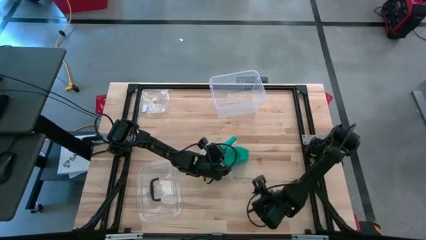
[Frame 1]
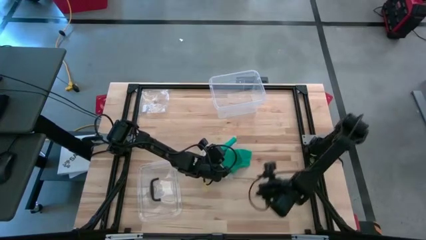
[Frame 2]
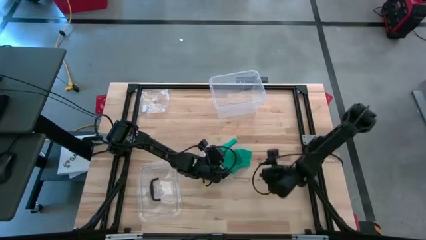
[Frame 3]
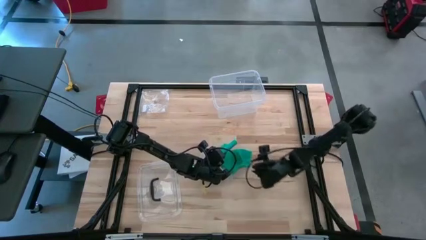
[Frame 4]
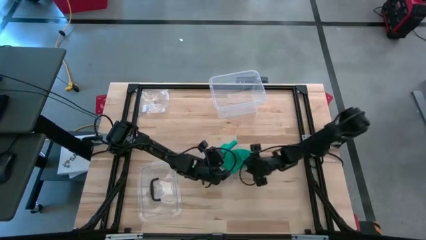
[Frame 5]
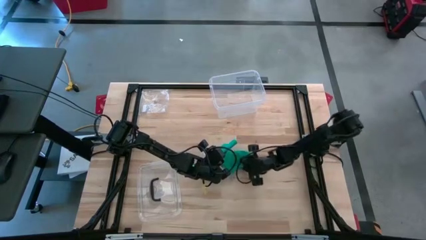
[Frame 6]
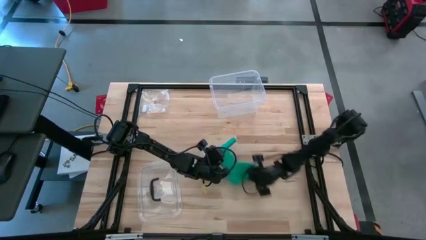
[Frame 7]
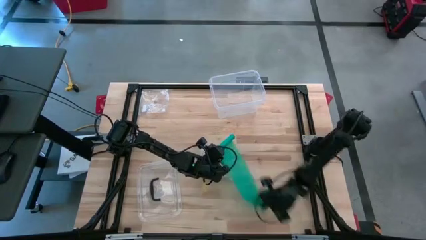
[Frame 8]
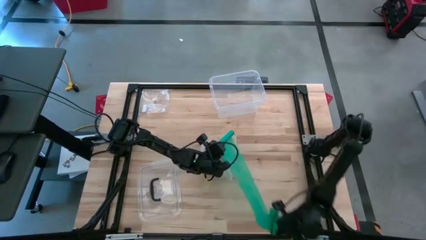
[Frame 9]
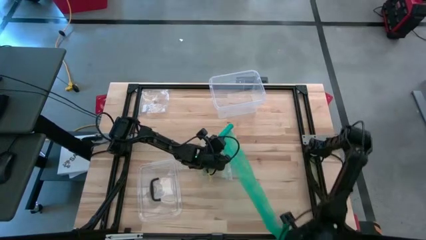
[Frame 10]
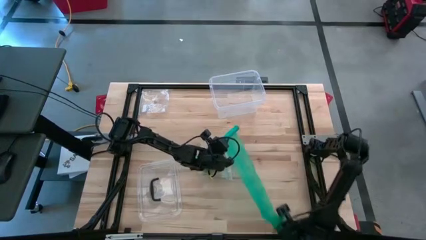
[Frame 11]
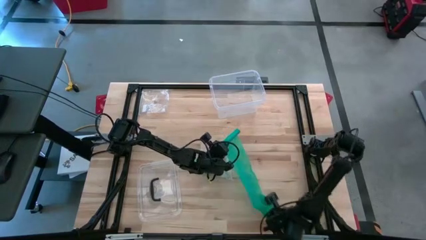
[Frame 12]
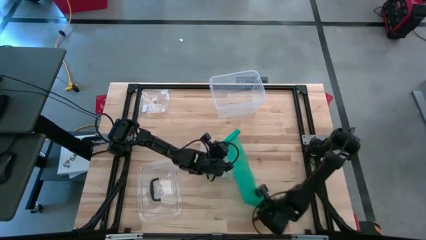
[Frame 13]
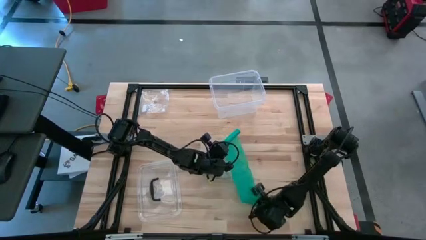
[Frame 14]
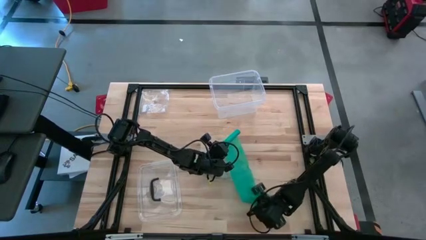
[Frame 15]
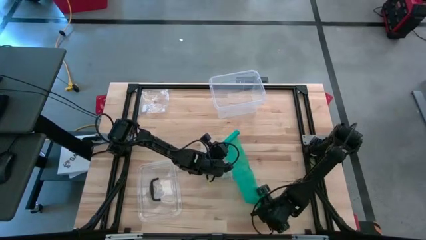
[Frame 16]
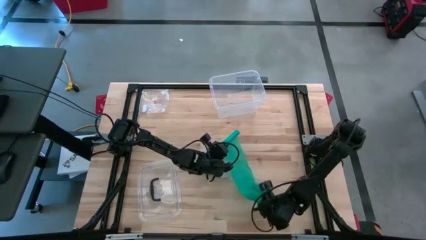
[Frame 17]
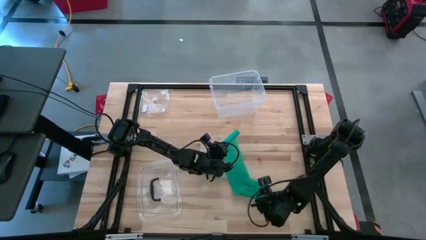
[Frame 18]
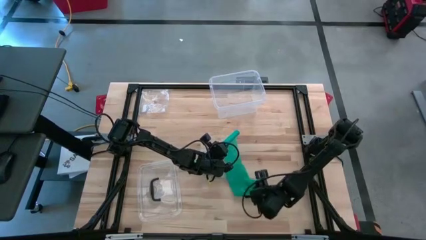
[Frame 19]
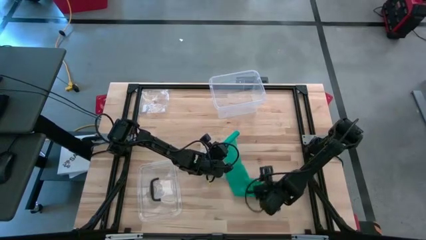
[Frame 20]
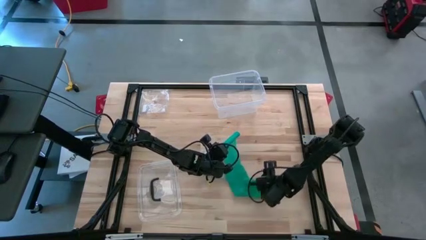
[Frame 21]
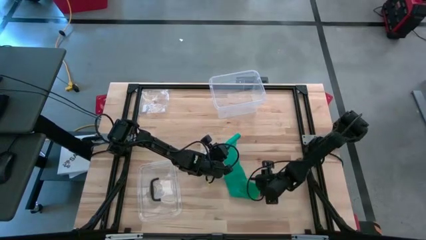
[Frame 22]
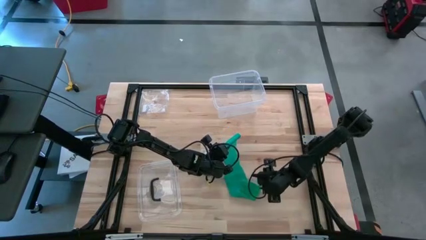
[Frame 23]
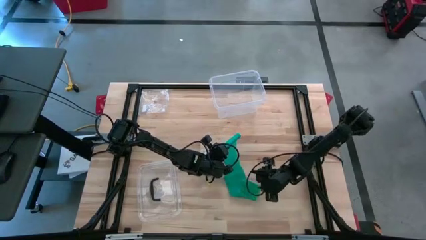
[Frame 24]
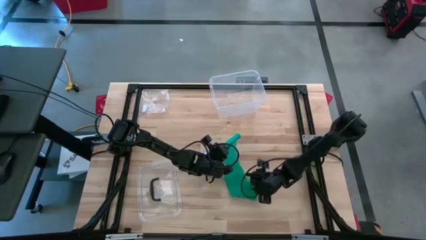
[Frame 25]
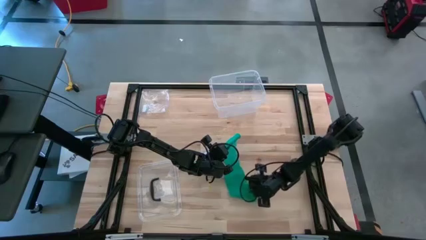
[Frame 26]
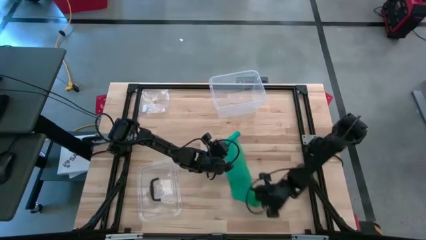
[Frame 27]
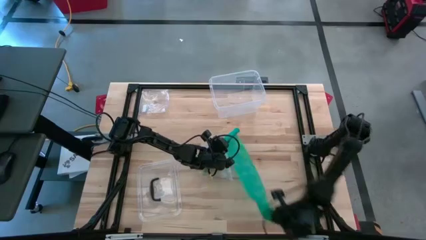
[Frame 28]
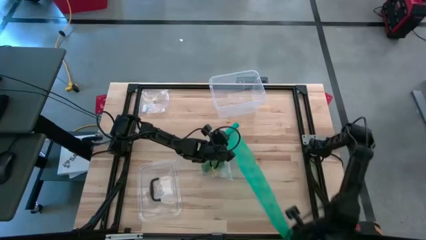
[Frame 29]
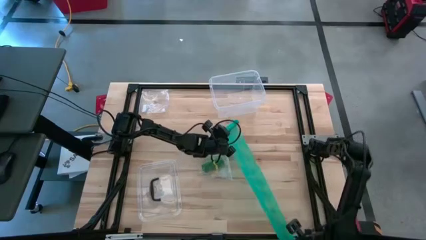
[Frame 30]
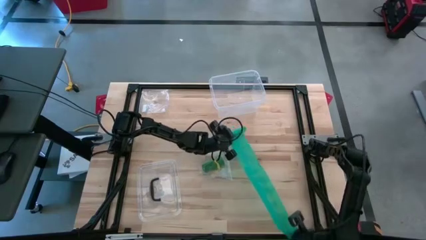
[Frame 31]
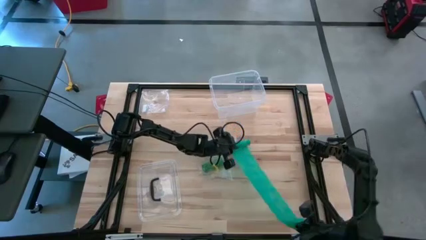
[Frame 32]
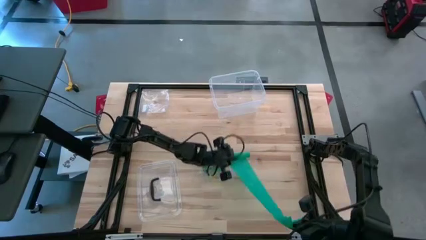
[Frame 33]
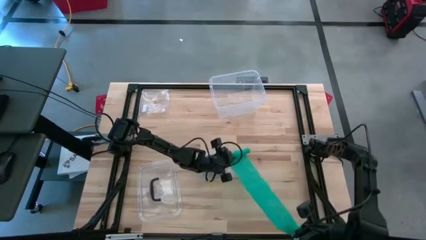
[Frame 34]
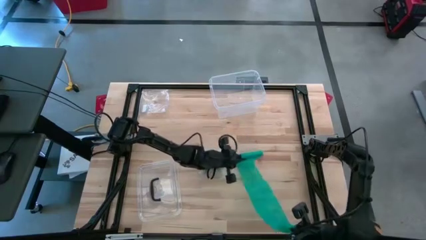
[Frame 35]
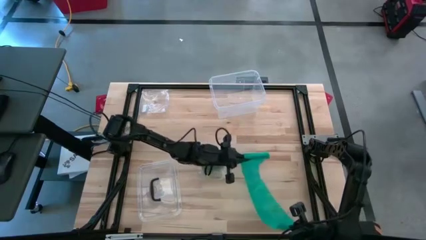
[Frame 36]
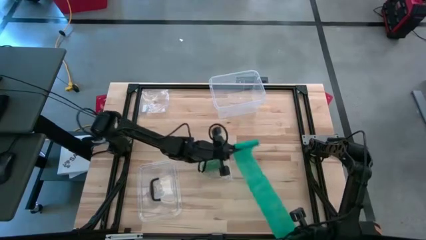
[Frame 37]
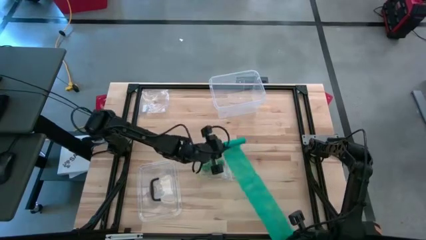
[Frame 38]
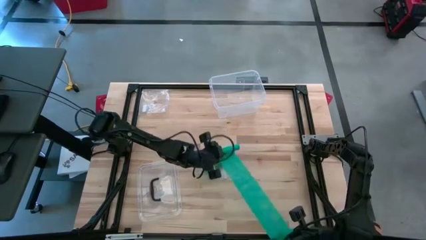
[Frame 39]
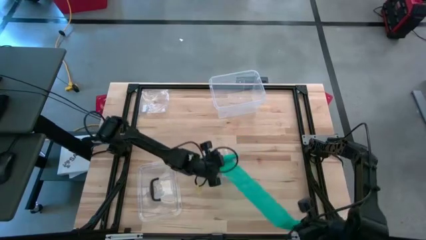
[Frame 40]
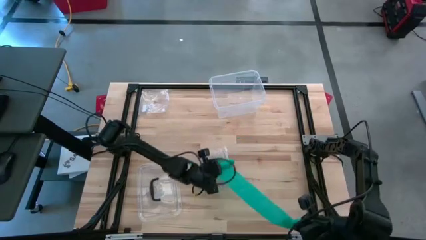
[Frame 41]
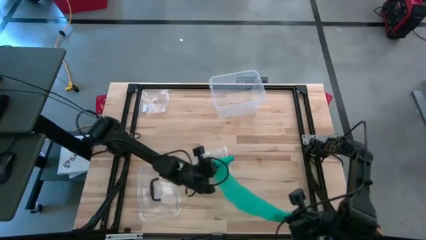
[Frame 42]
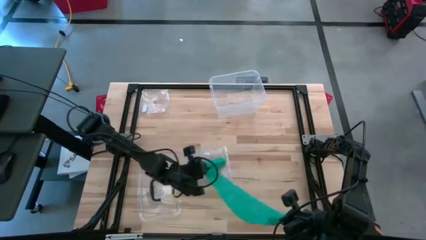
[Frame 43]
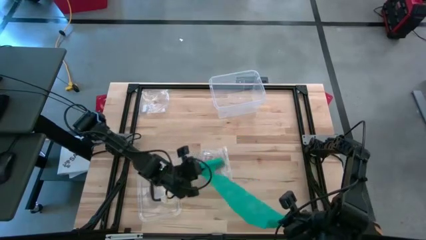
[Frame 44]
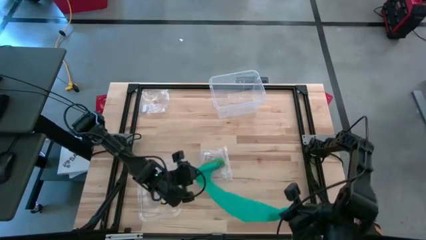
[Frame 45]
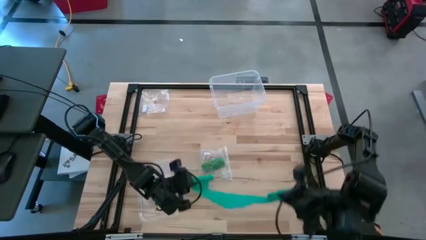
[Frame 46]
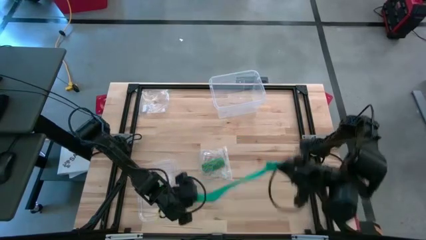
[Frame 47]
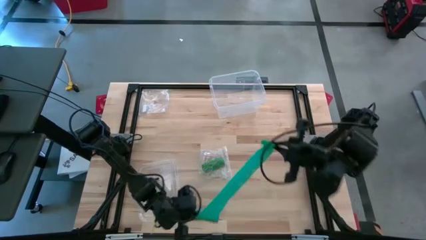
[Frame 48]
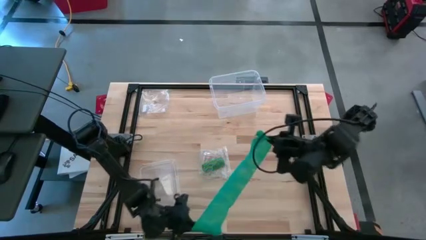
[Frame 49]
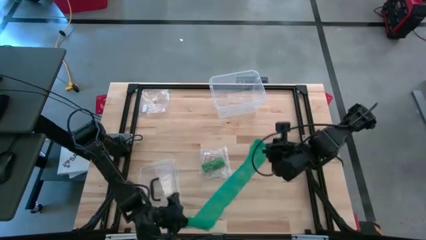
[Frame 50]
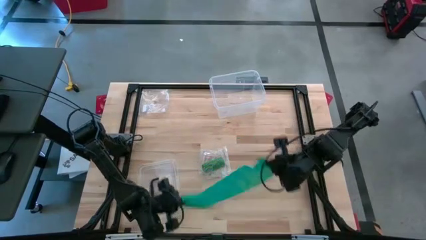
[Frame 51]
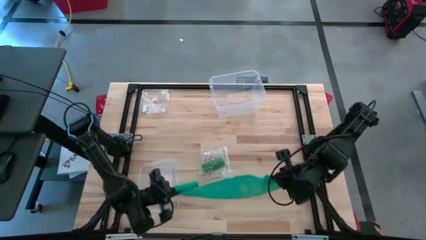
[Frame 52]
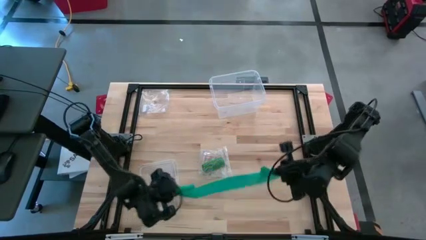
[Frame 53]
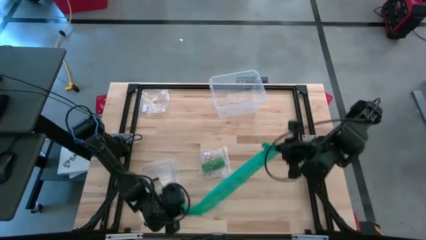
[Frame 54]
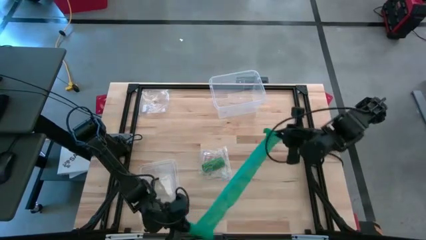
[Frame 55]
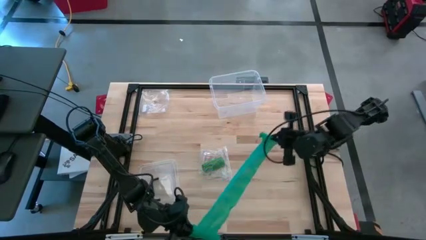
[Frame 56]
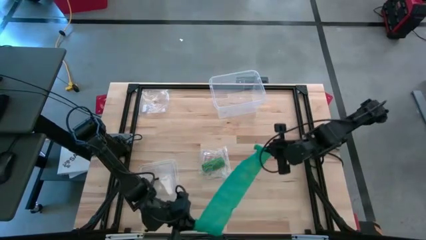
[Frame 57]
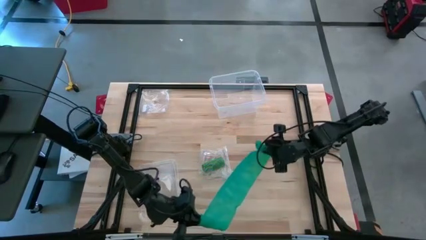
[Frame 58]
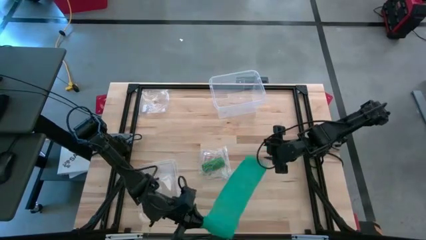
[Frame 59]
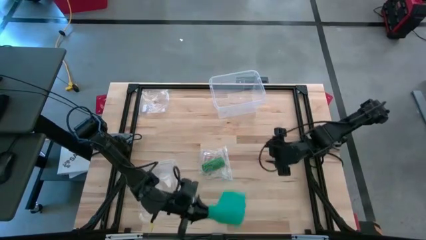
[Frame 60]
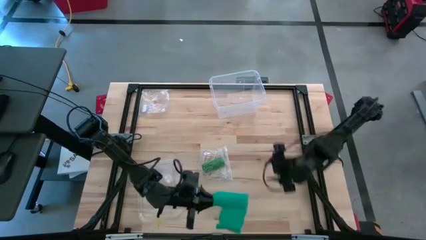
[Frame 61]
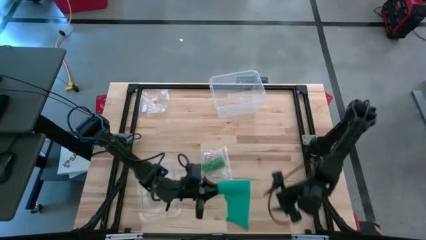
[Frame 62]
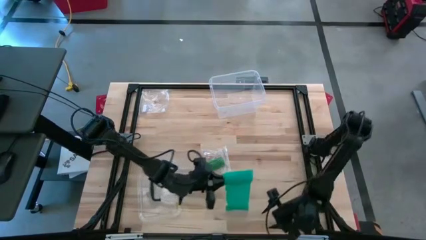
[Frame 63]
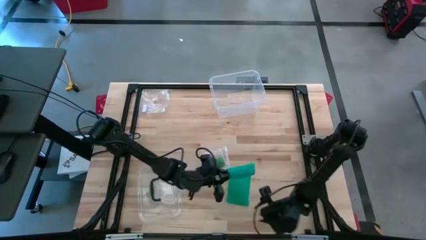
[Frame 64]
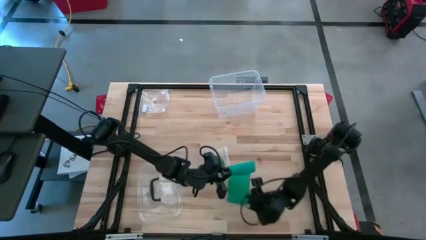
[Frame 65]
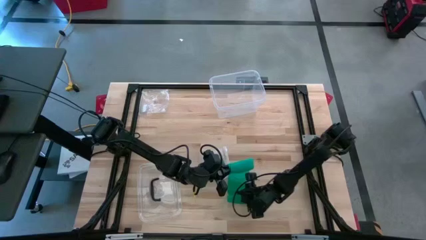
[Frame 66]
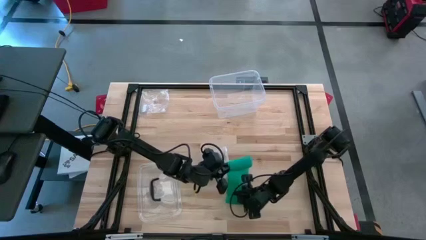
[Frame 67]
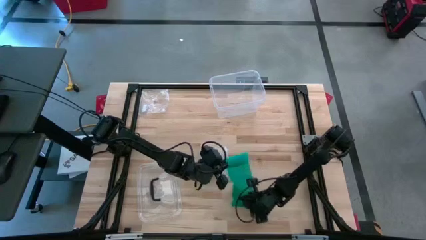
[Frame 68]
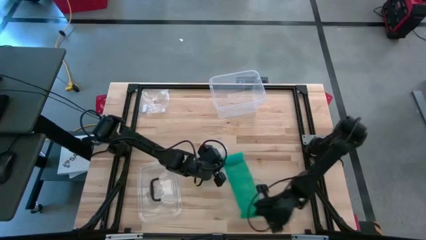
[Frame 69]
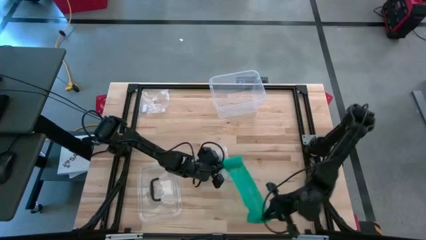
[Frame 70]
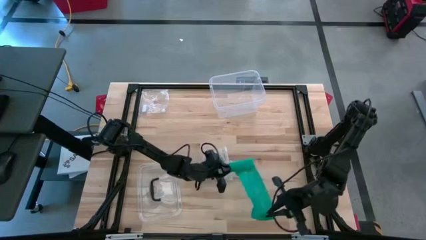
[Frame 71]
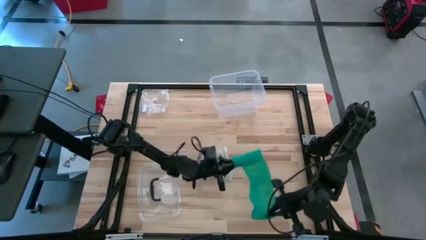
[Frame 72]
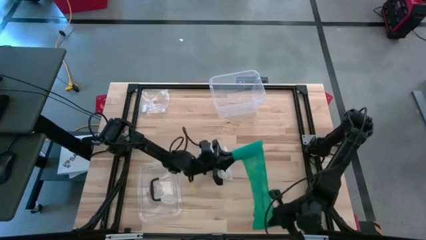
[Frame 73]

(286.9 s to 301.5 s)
Task: Roll bandage
Roll the blue bandage

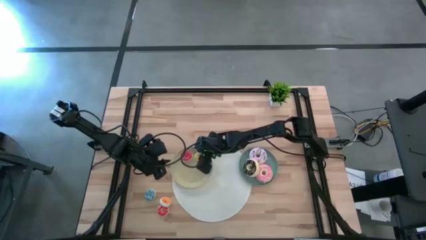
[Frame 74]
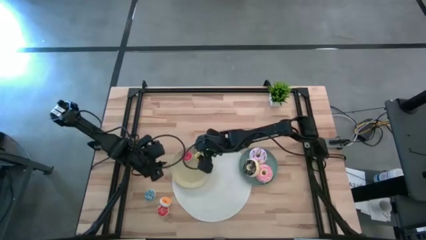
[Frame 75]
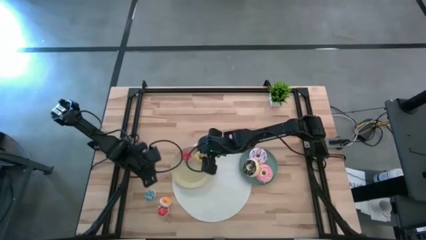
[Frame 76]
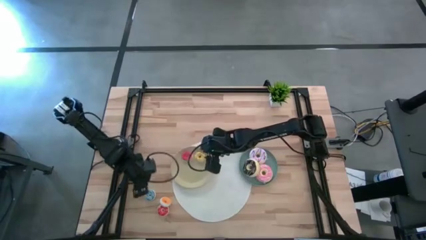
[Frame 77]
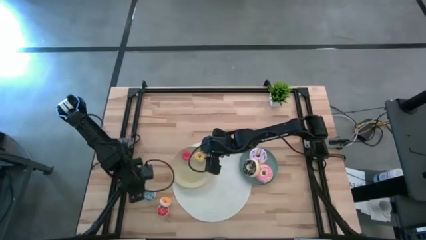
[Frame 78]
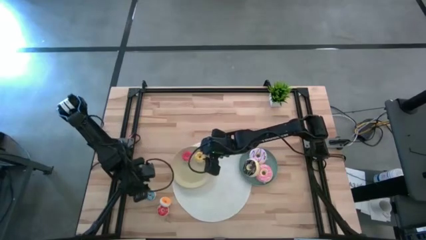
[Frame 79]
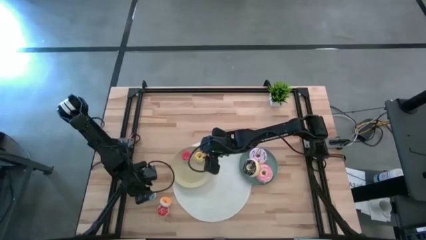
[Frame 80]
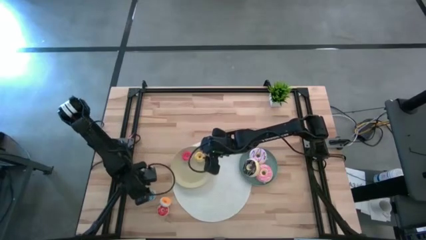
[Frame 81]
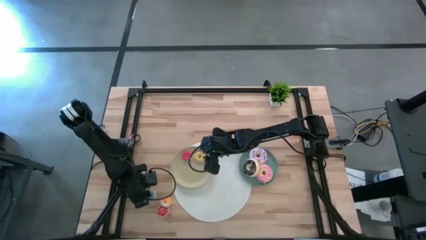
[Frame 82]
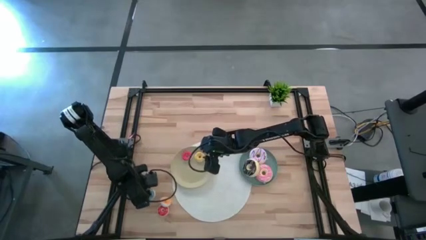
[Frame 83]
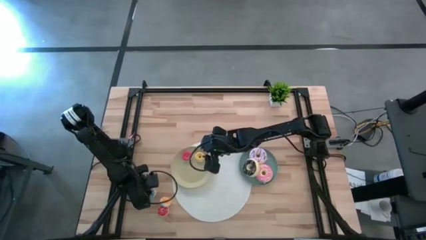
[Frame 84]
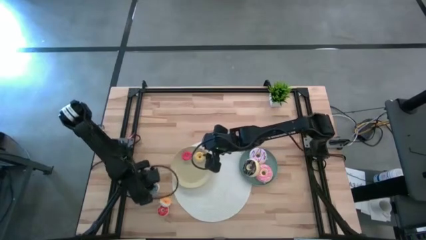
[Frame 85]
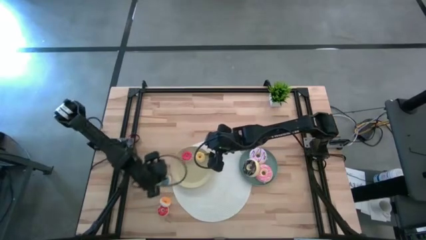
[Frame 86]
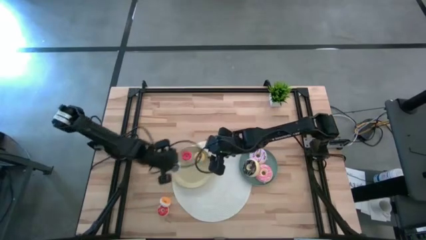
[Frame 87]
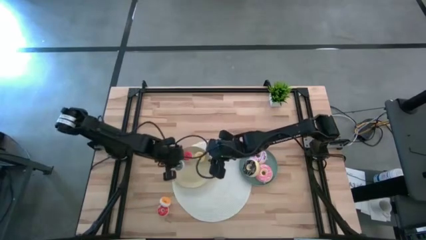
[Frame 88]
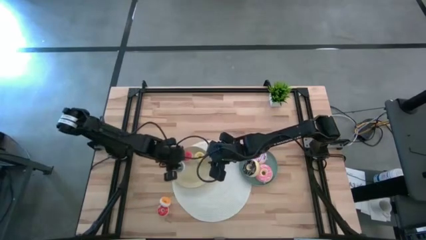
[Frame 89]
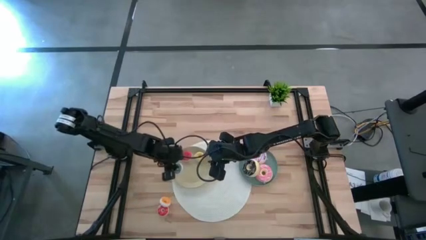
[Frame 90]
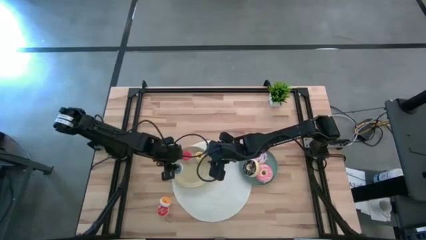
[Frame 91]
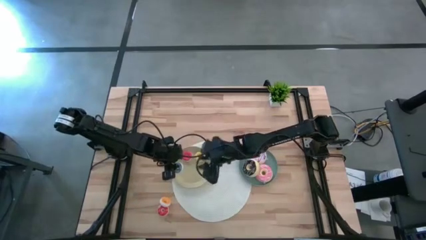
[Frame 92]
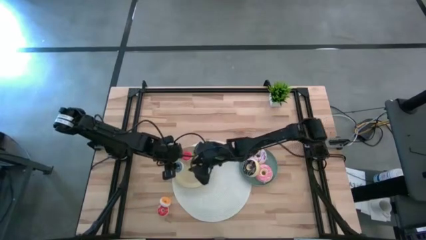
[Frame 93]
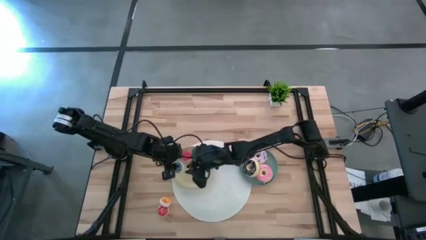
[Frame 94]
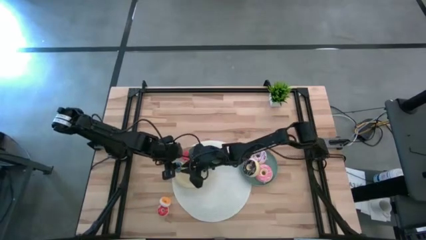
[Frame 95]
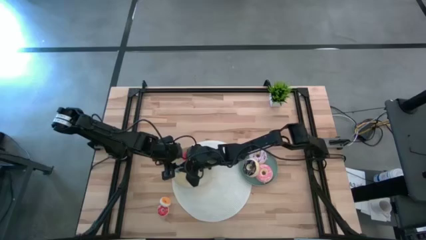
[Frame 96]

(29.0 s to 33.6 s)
Task: Pick & Place donuts
Put the small blue donut on the brown plate
